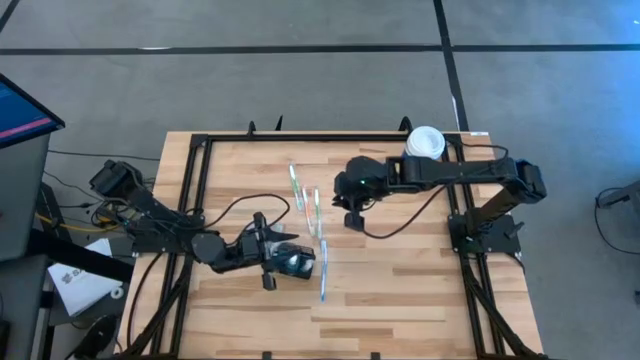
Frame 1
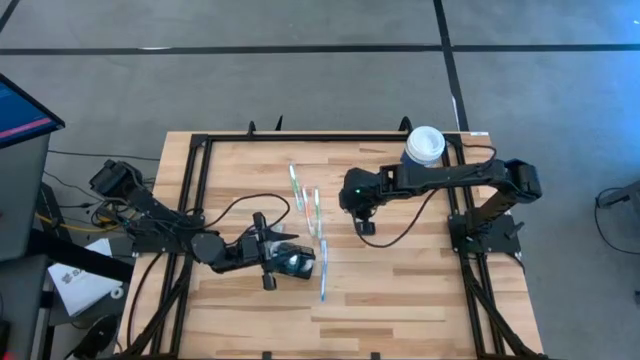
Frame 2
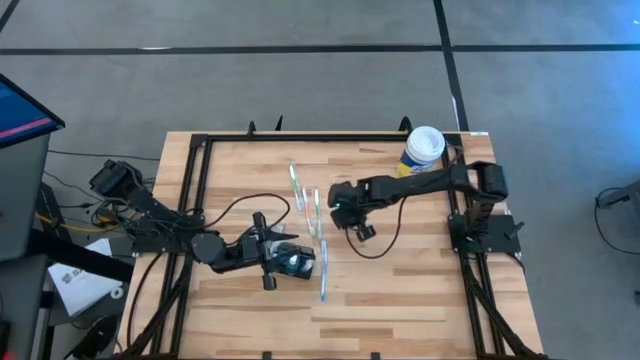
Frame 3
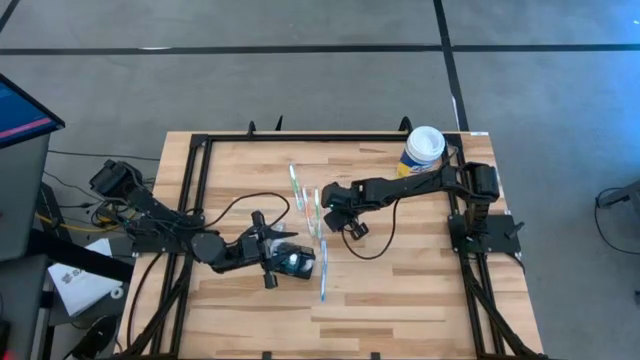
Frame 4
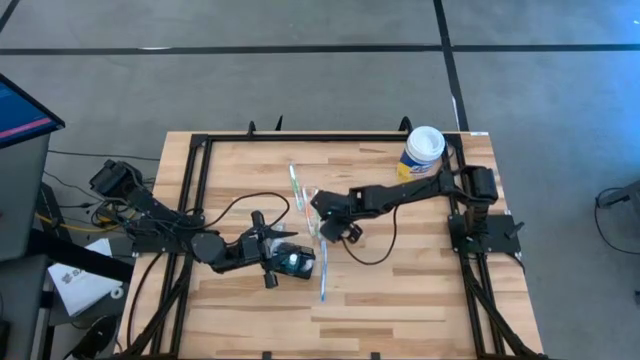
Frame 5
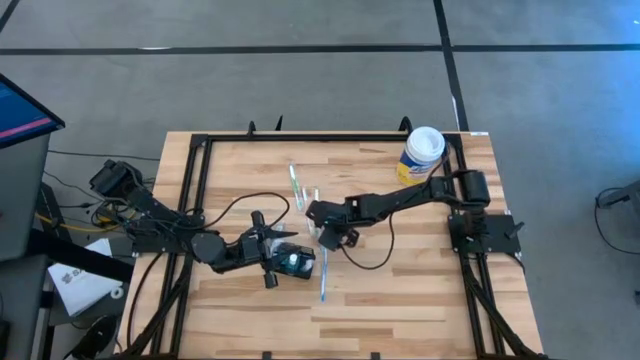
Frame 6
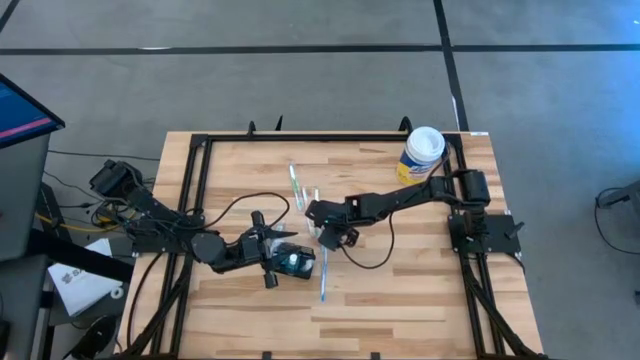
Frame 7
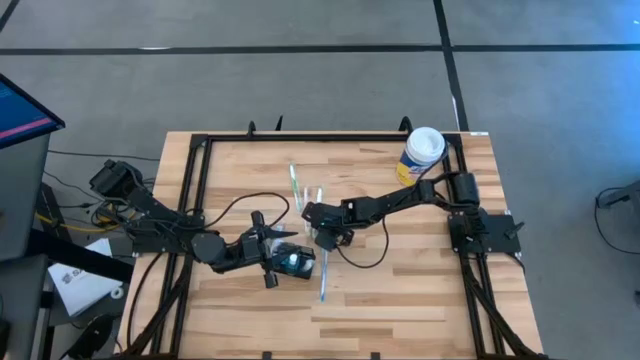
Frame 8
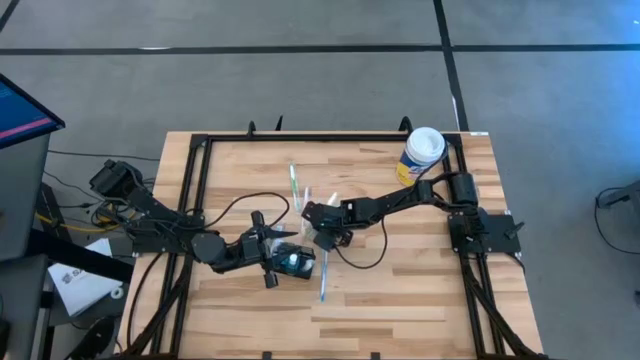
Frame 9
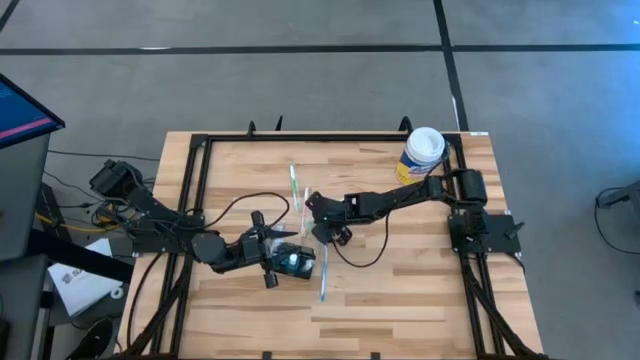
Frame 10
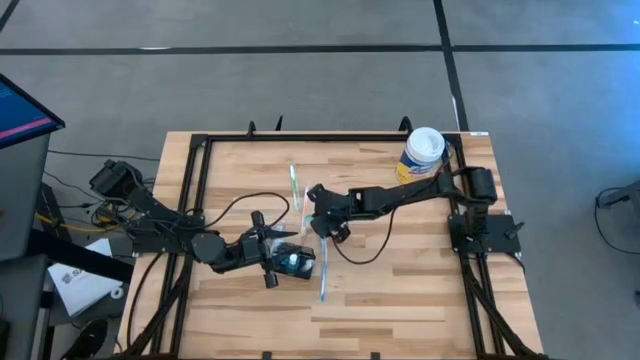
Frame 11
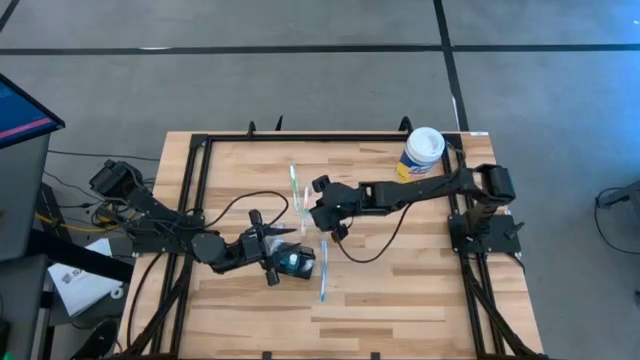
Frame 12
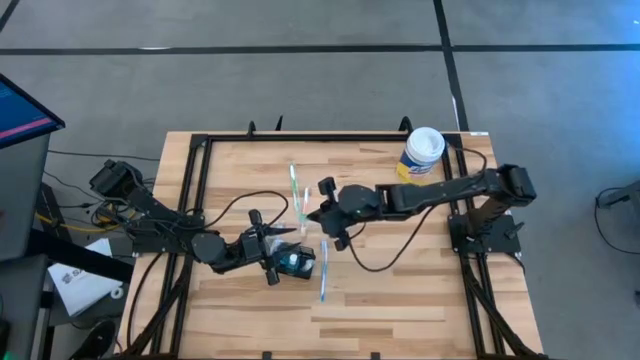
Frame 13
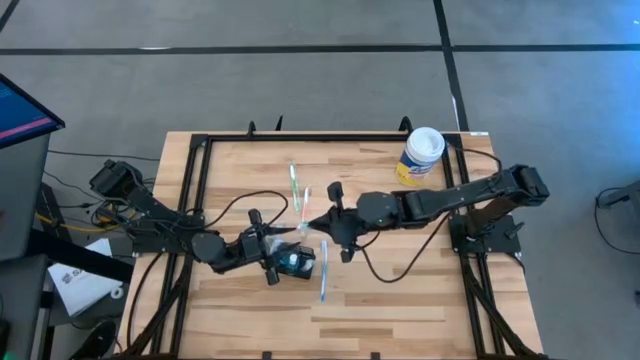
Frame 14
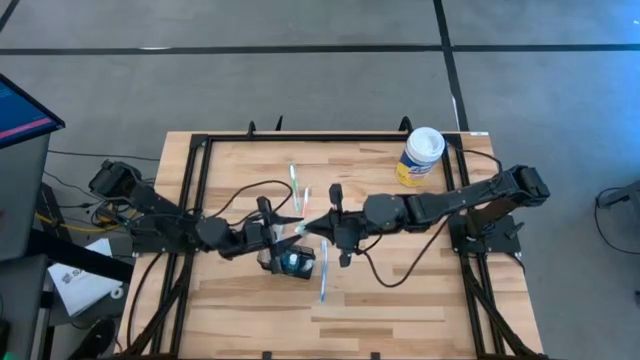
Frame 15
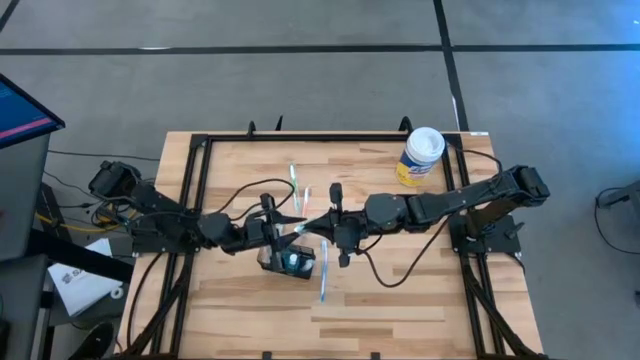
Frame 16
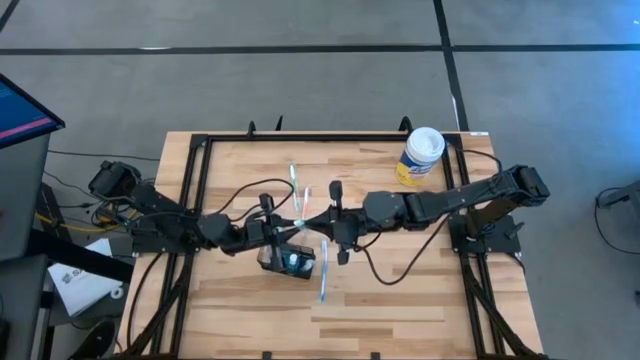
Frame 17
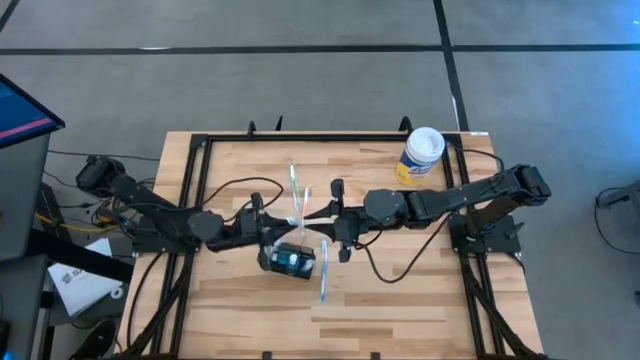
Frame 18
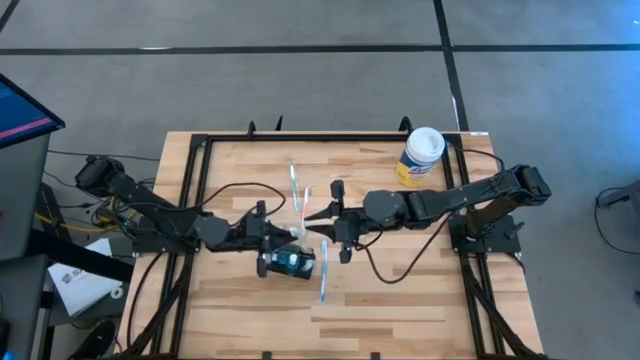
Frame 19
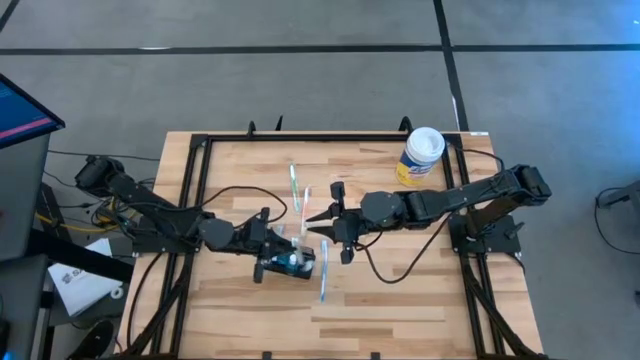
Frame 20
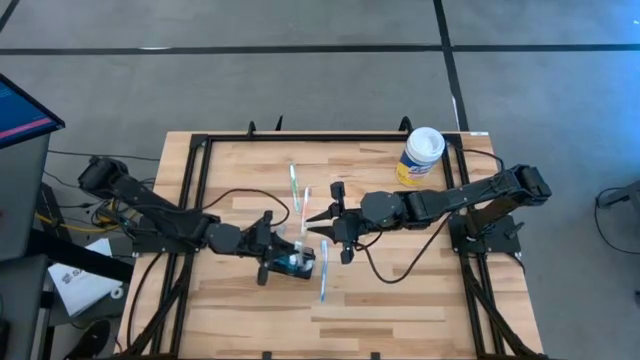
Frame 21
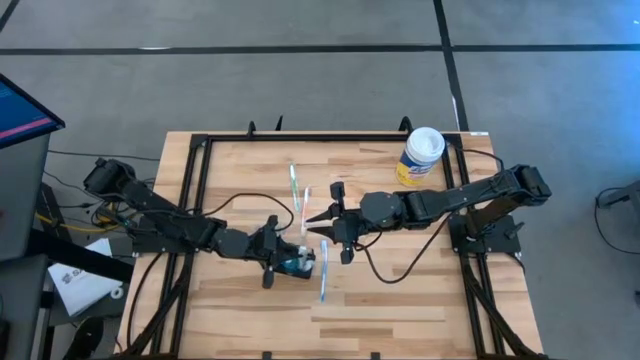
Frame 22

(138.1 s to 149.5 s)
Task: Pick & Place toothbrushing station
Put the right green toothbrush into the wire organizer

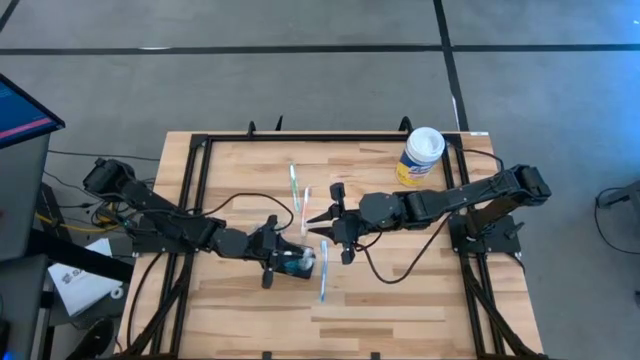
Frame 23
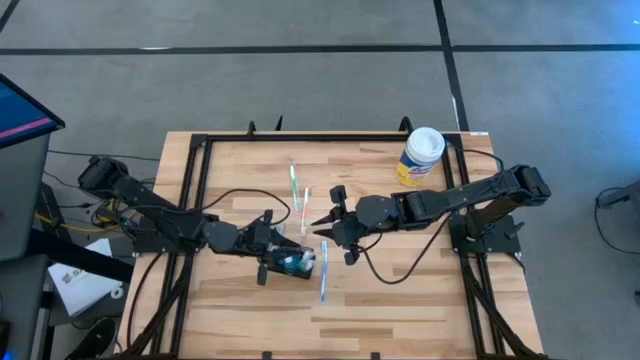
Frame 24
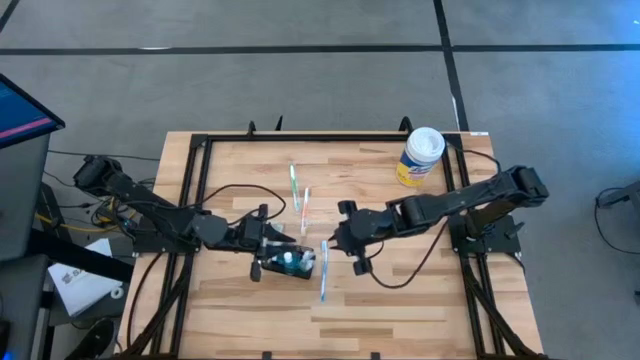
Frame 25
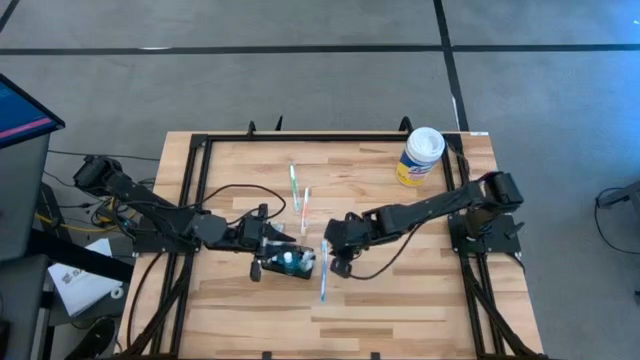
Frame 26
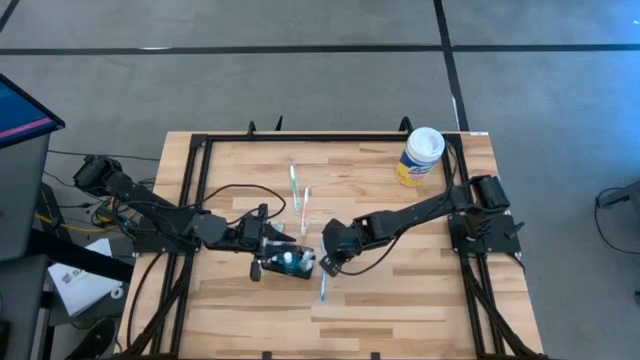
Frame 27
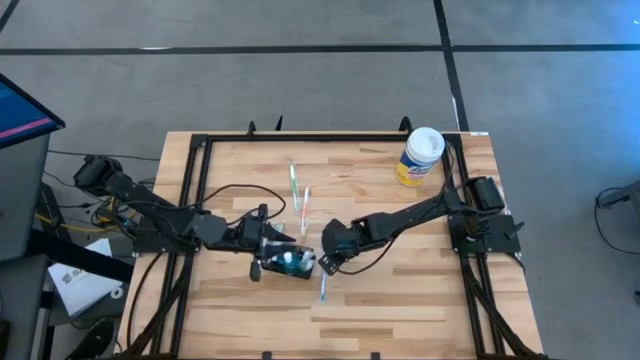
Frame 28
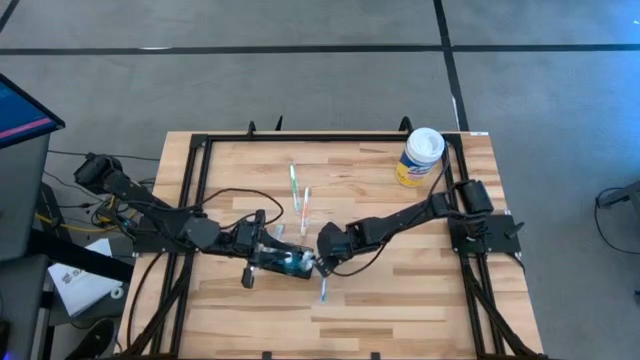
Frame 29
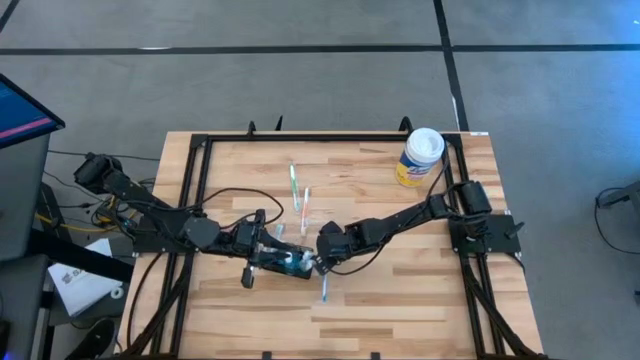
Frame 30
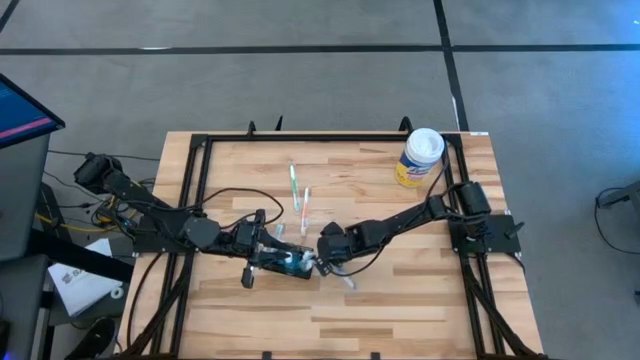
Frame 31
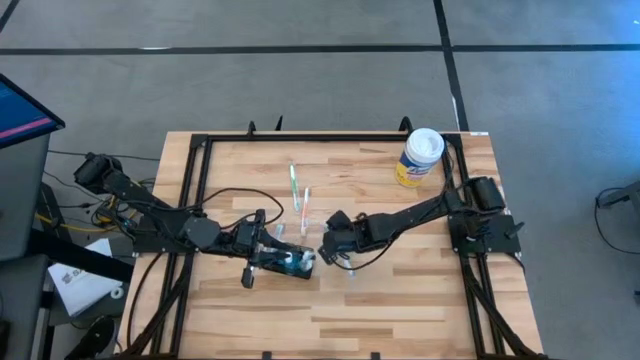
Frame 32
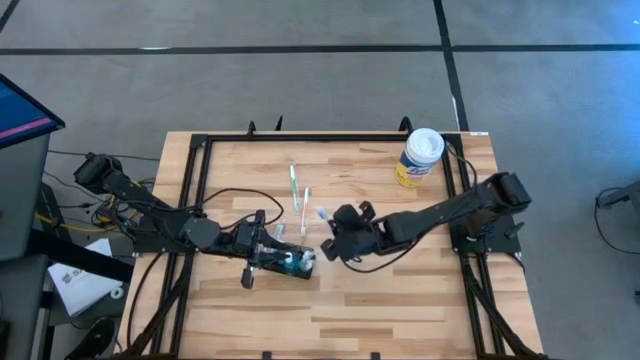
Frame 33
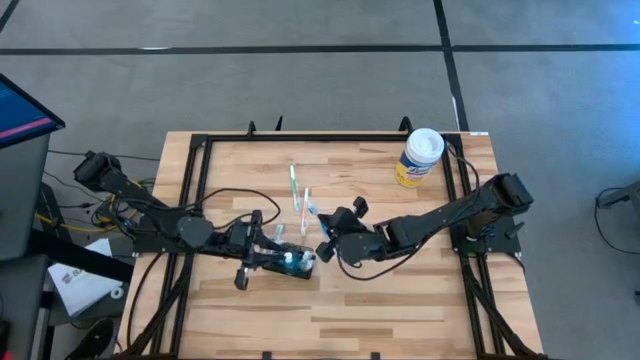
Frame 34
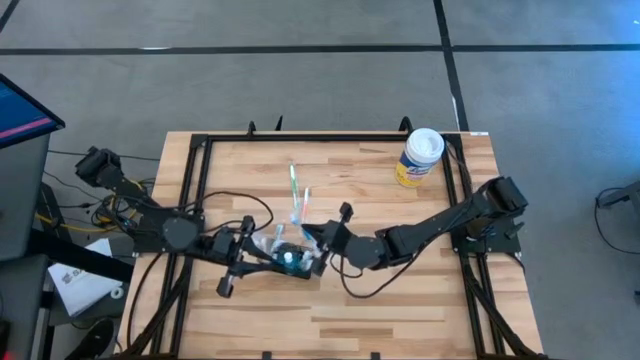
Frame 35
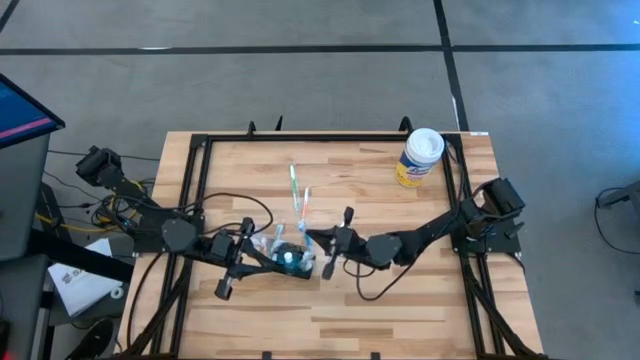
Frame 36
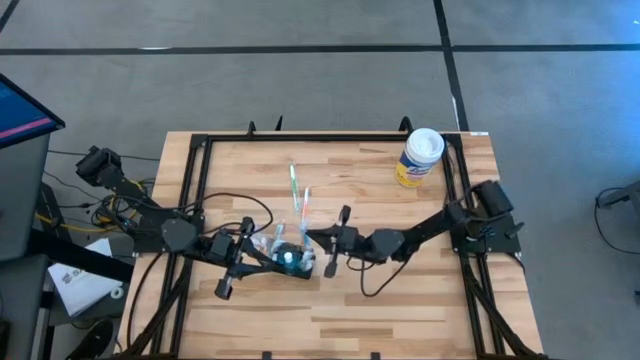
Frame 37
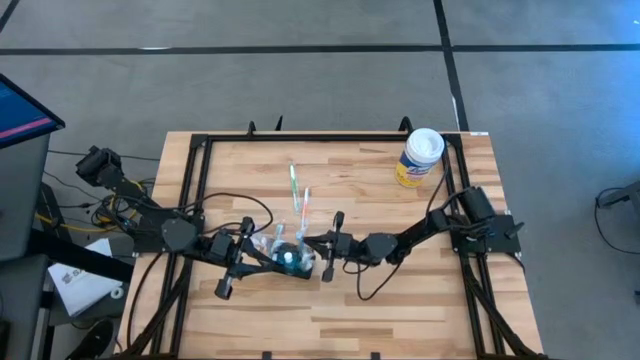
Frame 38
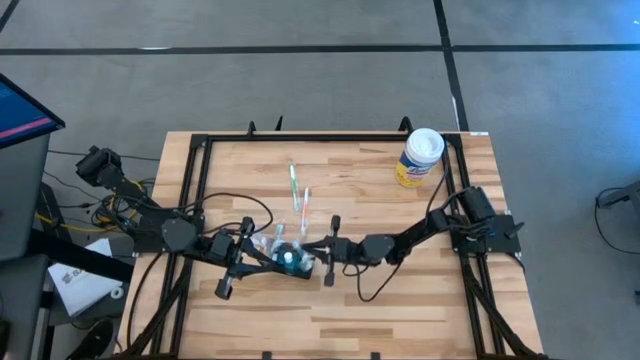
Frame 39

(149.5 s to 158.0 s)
Put the blue toothbrush into the wire organizer

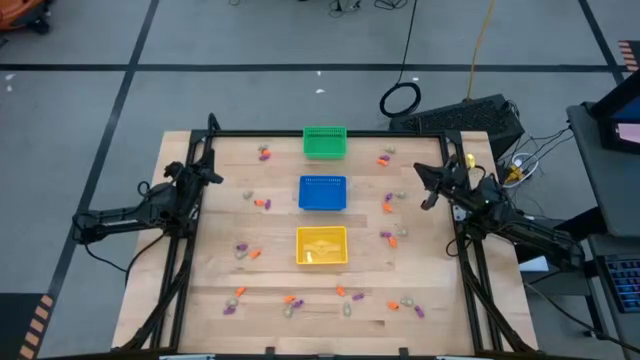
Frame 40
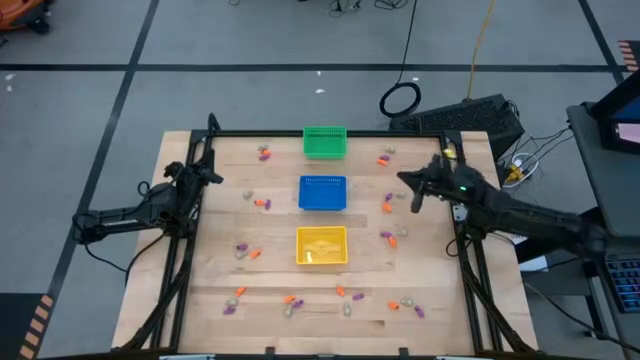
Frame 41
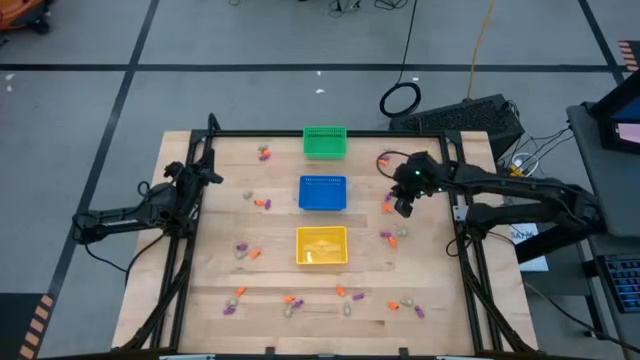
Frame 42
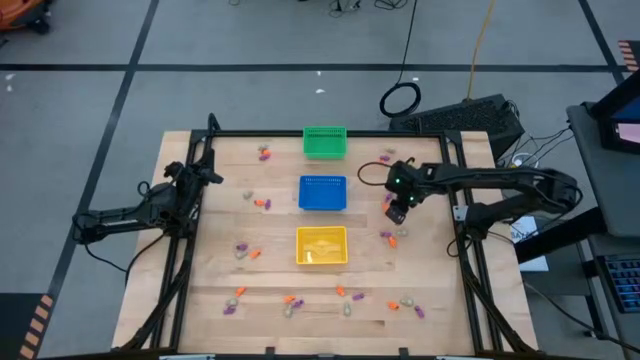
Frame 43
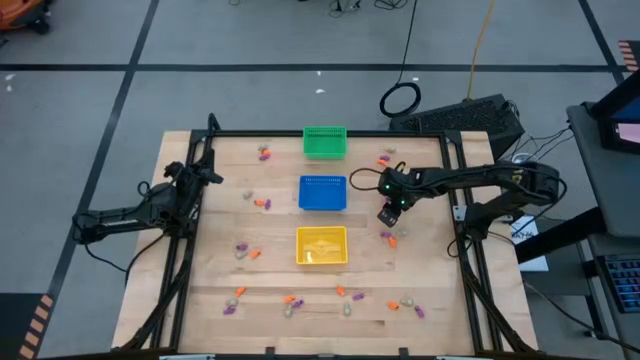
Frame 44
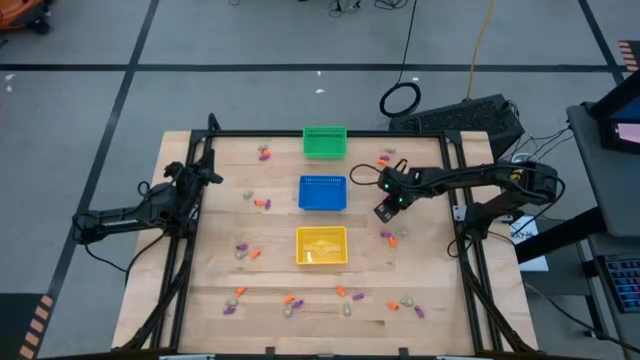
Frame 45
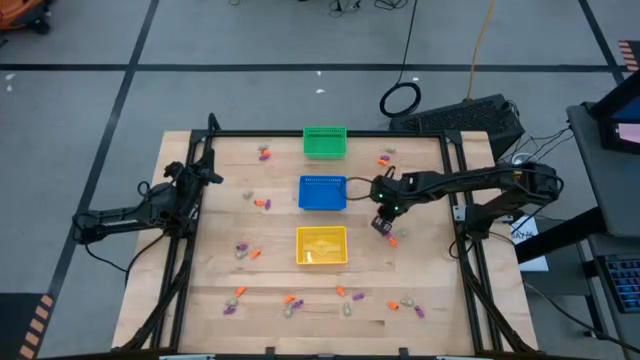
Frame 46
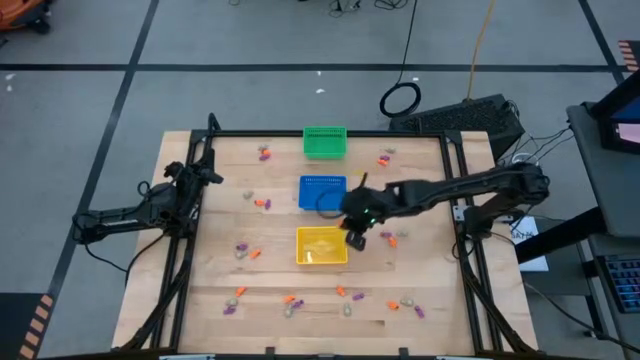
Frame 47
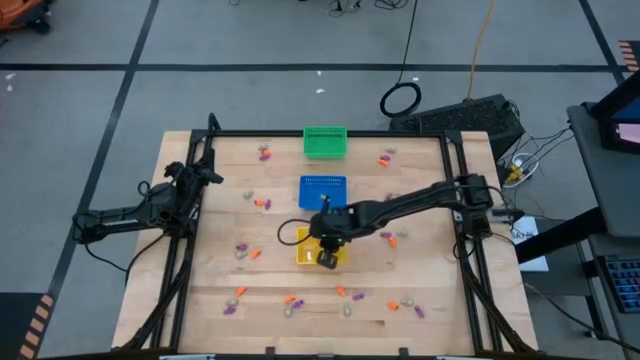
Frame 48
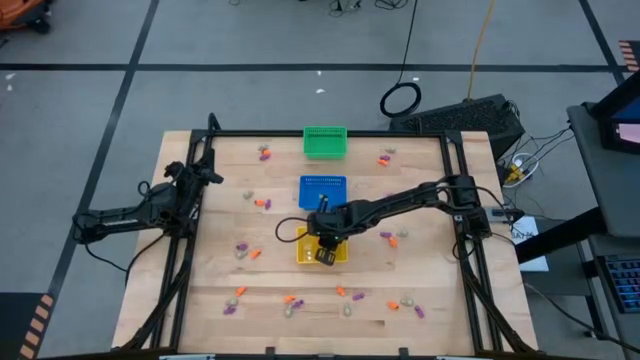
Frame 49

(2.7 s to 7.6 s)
Task: Sort Halloween decoration
Put the orange skeleton toy into the yellow bin
